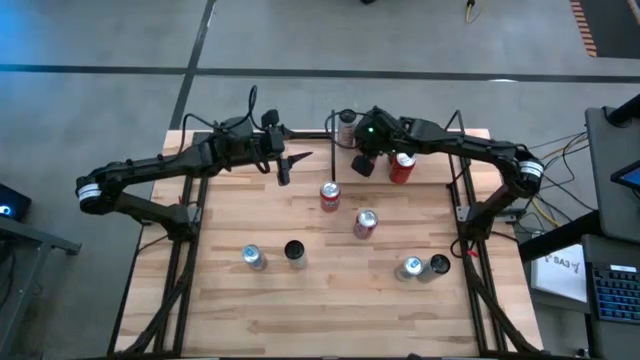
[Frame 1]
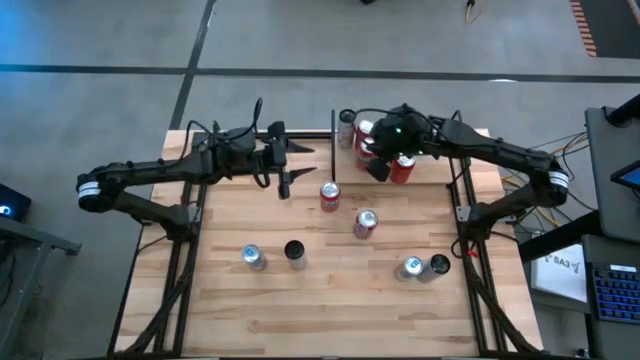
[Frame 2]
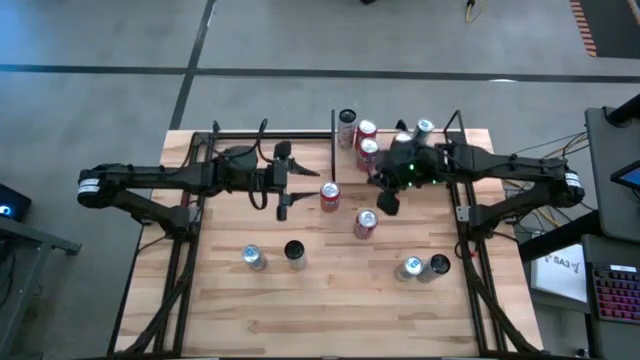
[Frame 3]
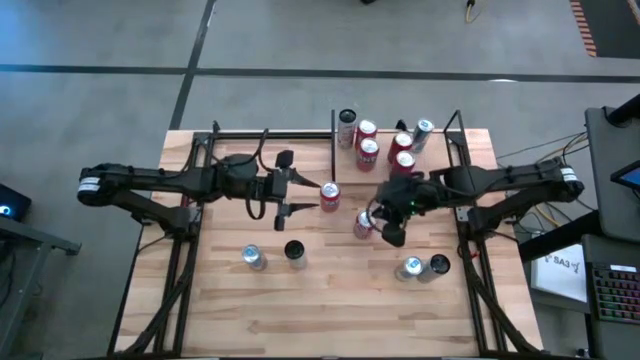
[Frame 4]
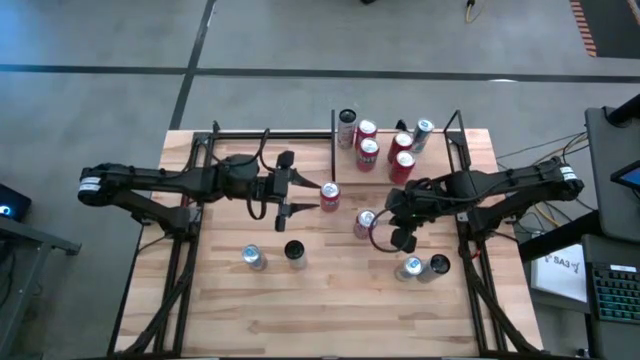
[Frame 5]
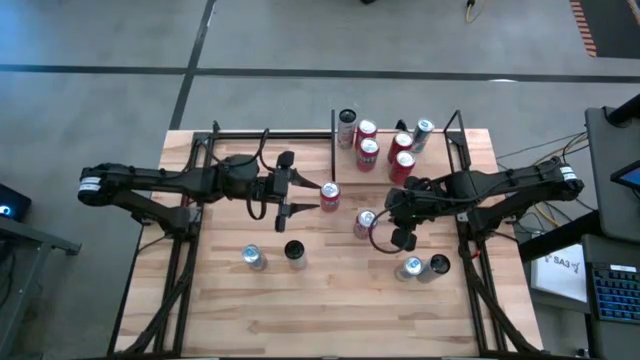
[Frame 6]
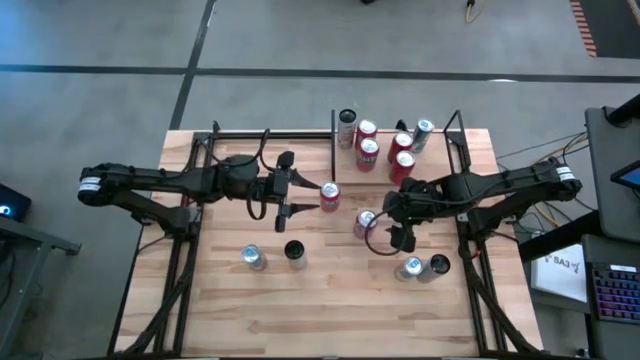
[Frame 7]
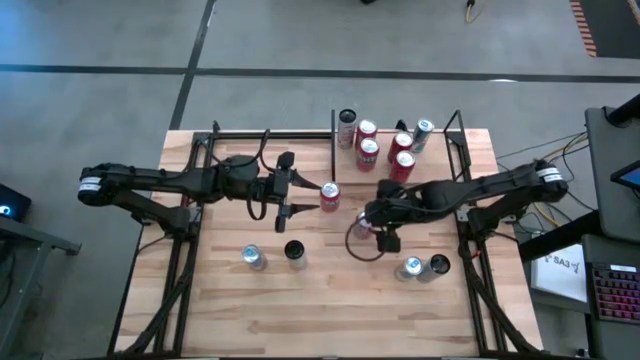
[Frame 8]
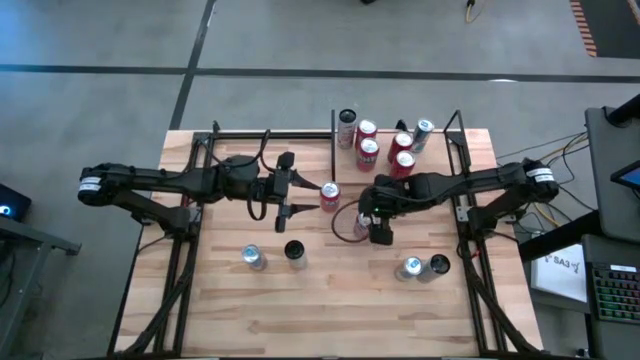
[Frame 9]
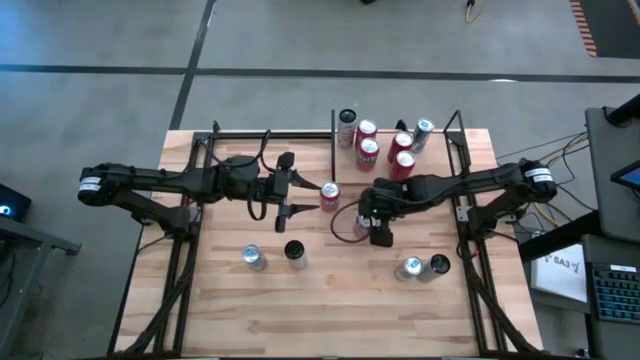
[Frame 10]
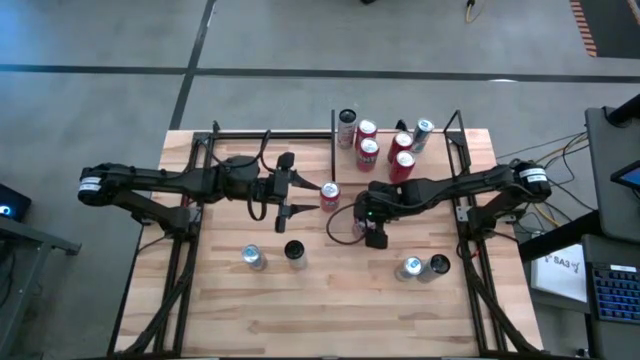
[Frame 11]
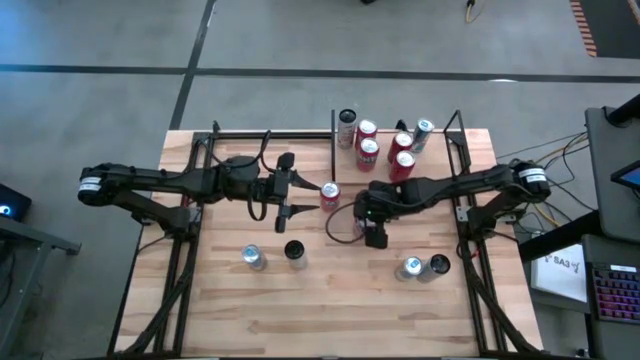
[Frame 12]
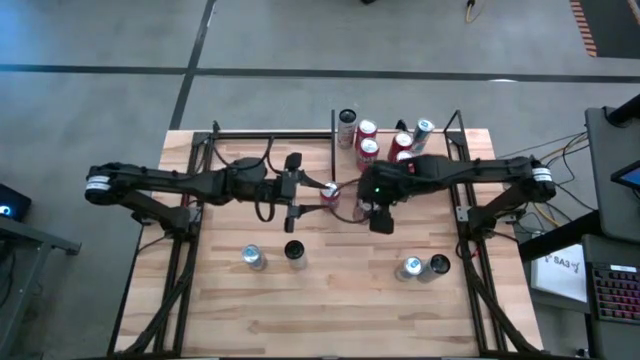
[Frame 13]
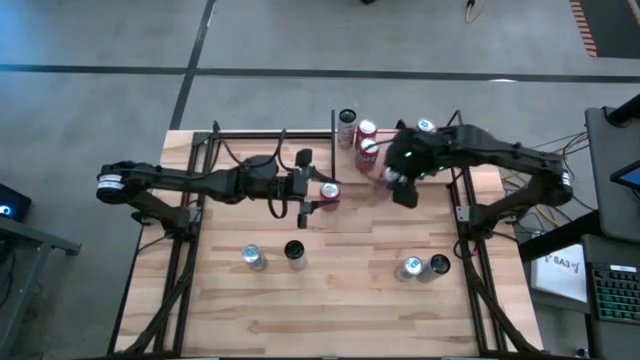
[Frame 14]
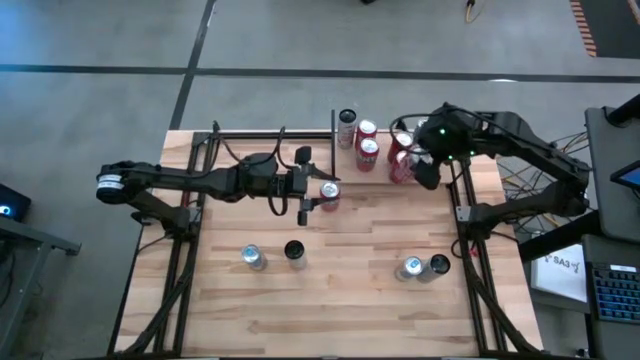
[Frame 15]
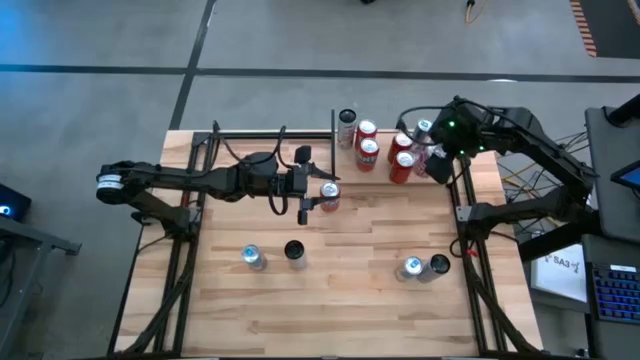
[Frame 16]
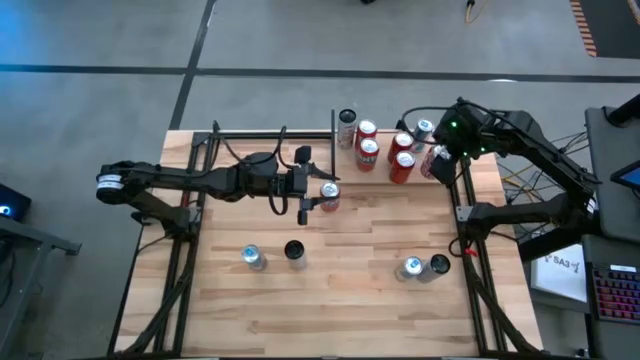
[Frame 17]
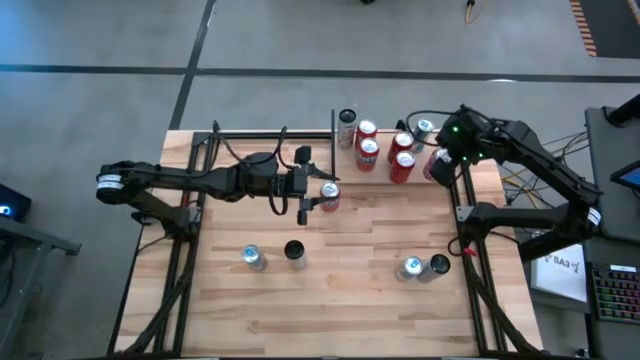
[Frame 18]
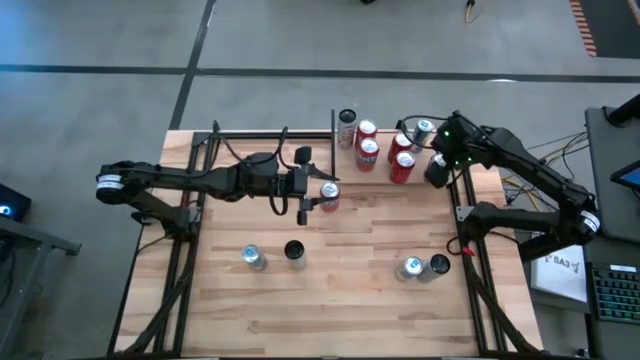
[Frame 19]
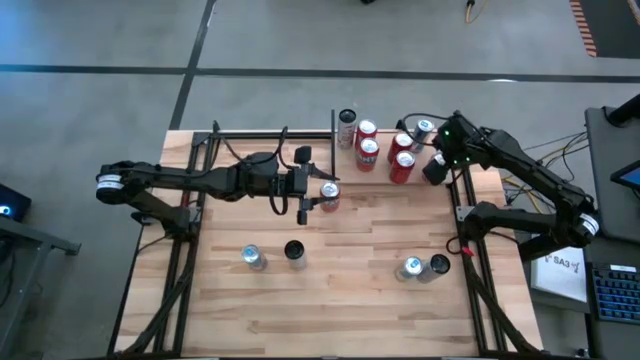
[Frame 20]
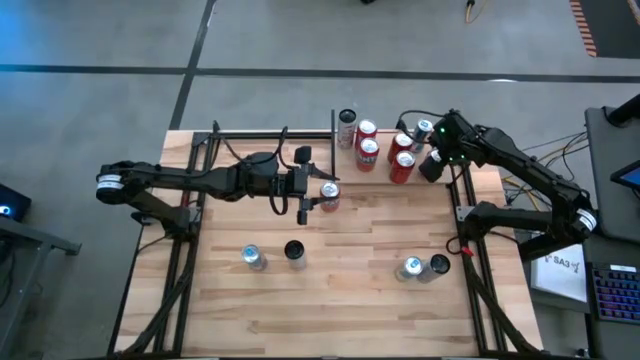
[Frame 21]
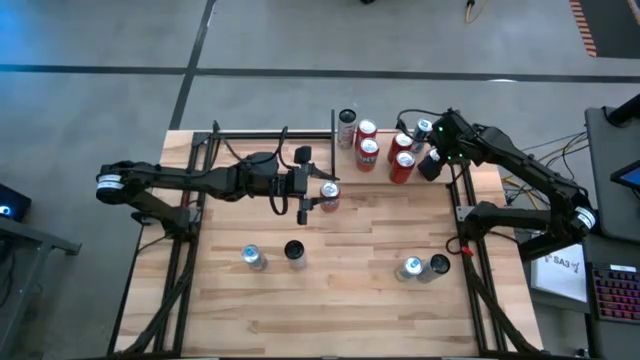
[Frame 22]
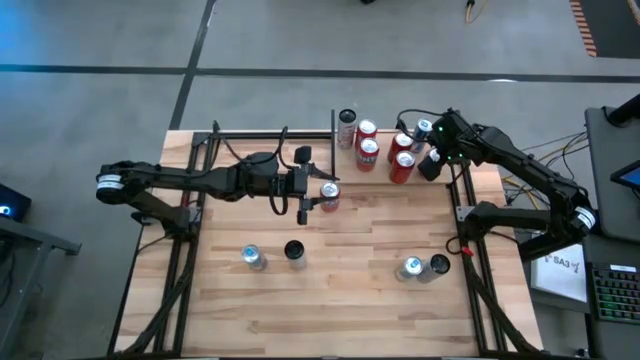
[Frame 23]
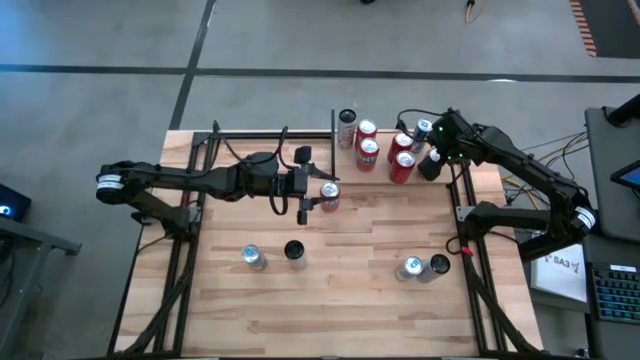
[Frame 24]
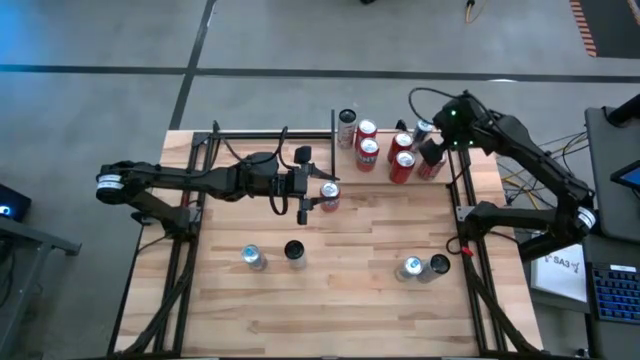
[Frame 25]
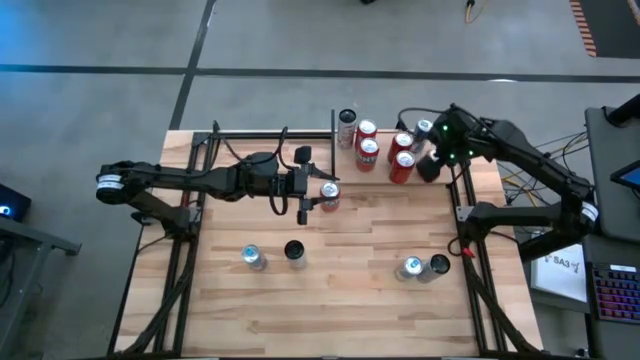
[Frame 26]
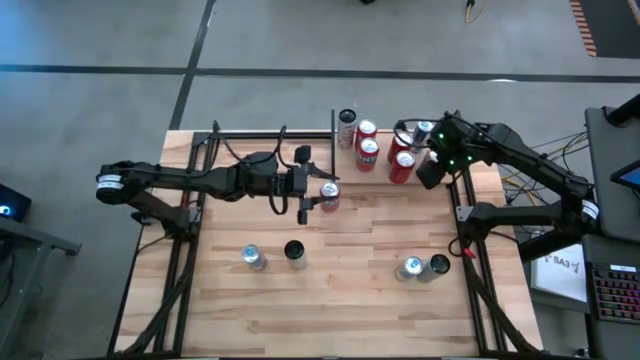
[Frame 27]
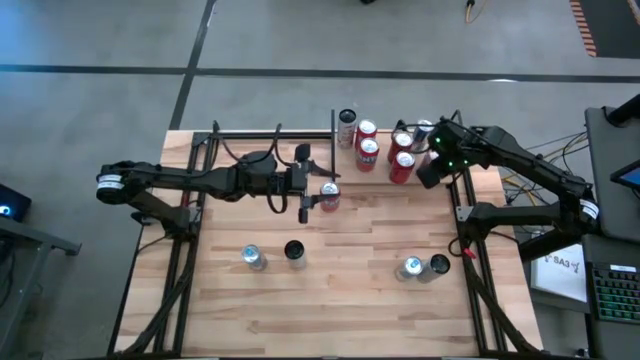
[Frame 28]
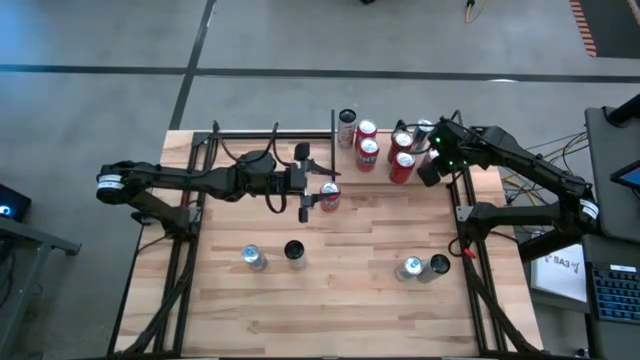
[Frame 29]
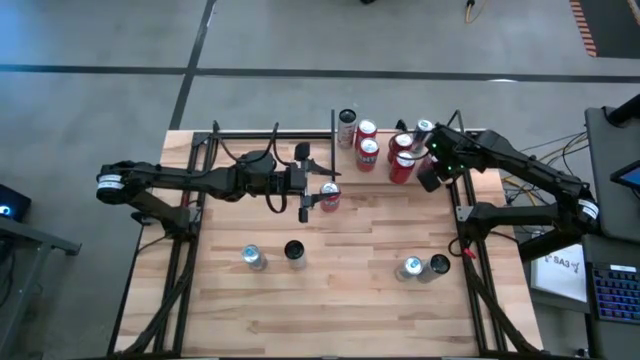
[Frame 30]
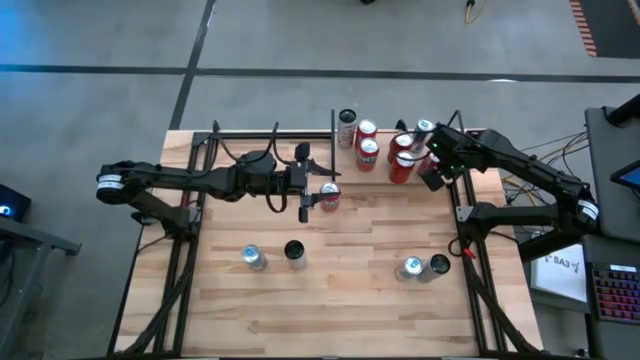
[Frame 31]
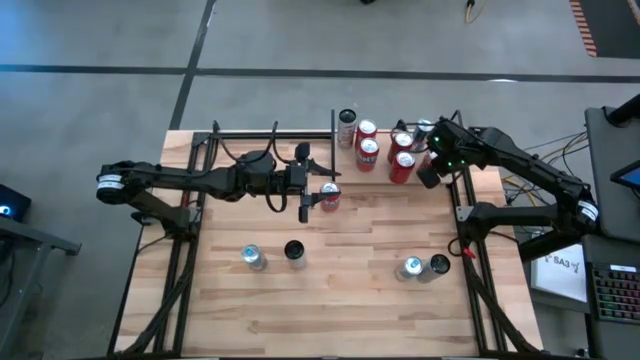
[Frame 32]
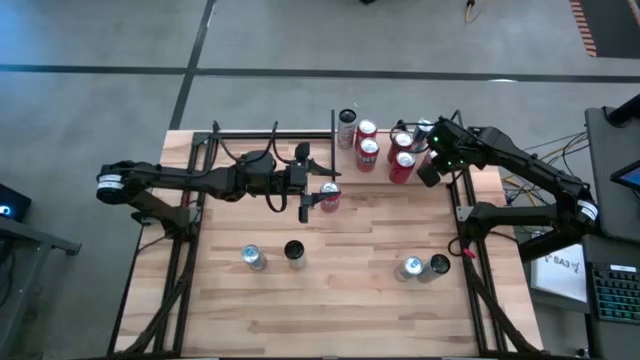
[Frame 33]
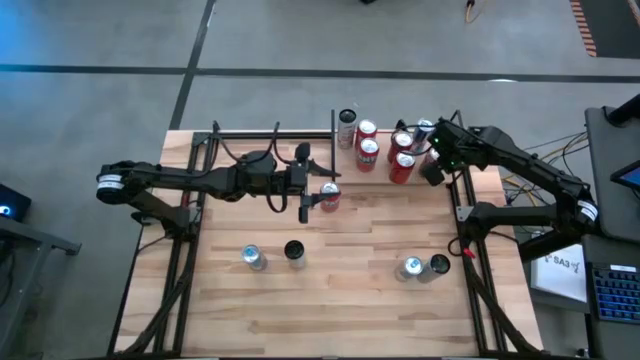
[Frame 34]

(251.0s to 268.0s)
Task: Place canned beverage on shelf
Put the red white soda can on the shelf

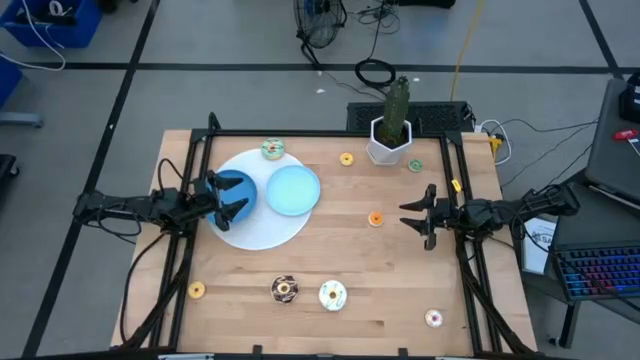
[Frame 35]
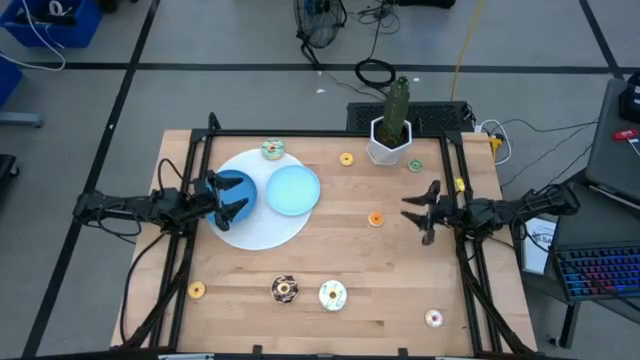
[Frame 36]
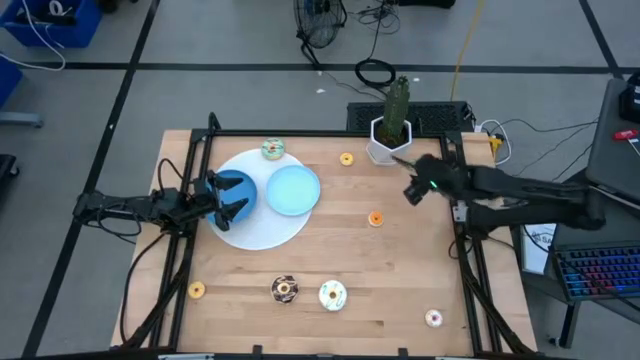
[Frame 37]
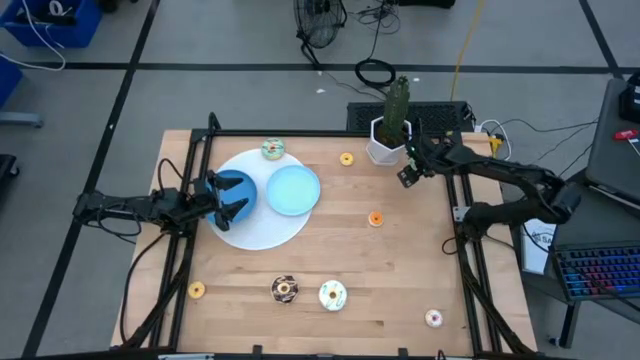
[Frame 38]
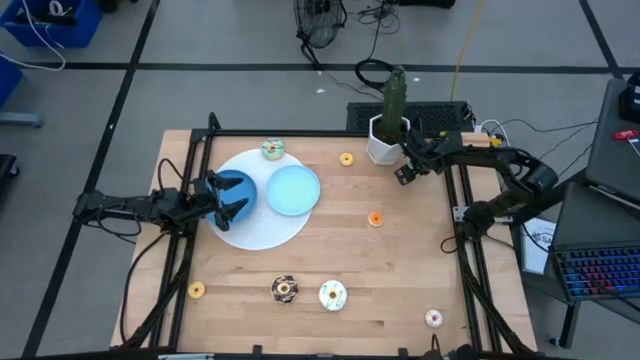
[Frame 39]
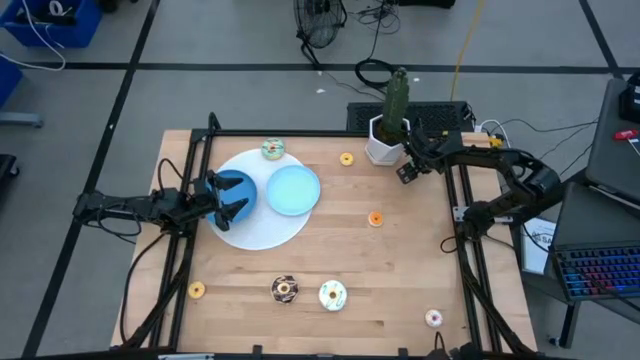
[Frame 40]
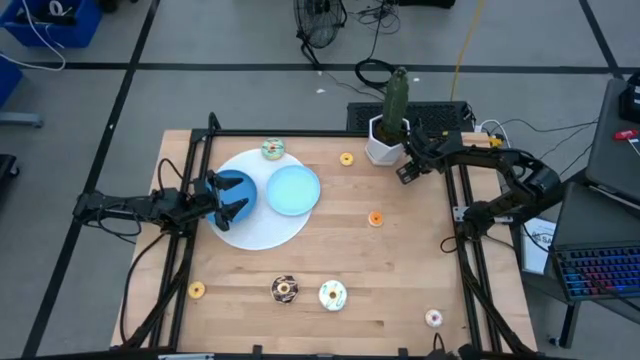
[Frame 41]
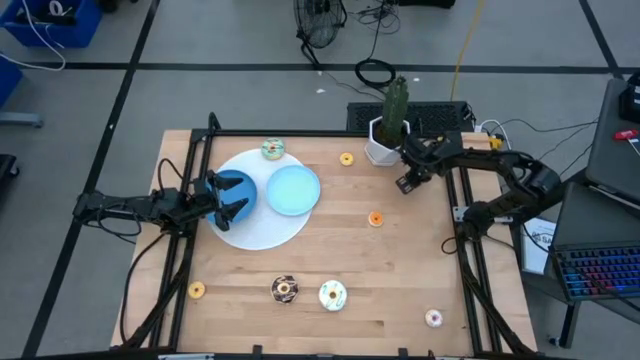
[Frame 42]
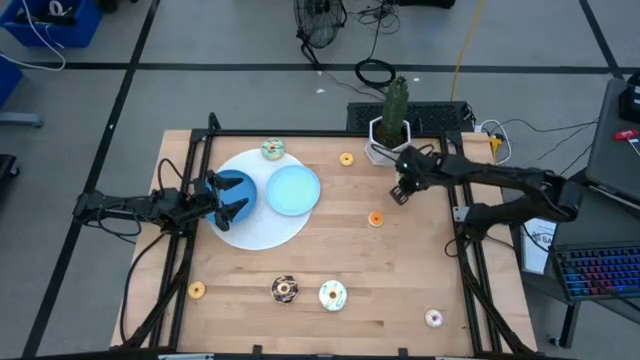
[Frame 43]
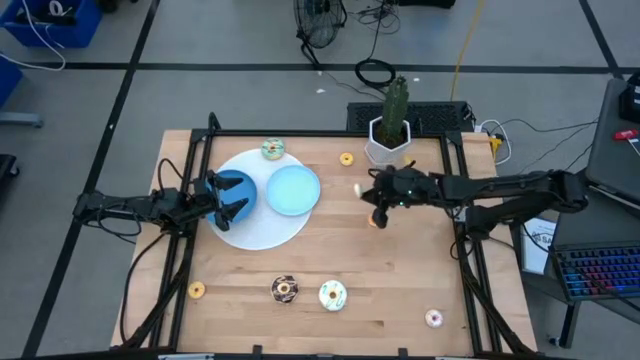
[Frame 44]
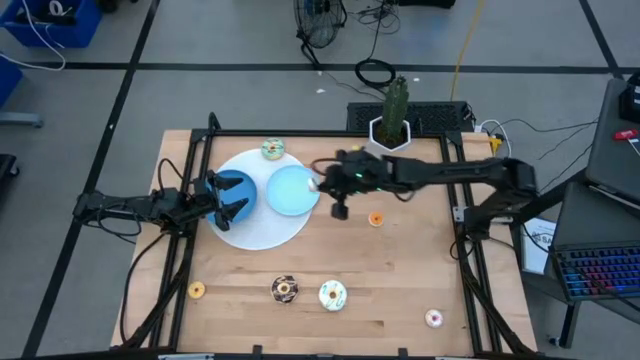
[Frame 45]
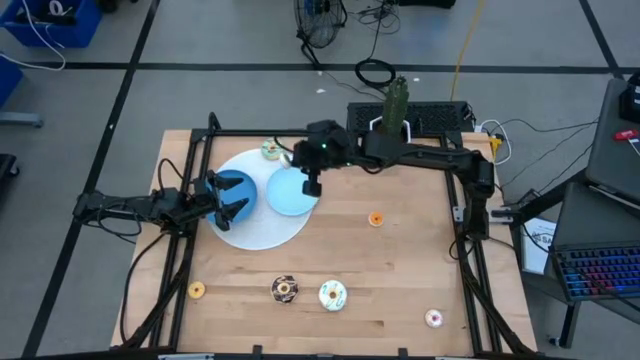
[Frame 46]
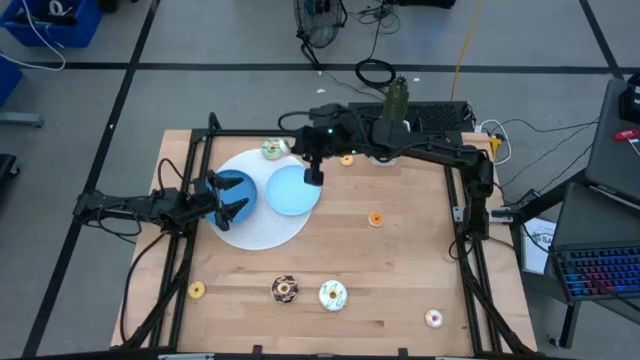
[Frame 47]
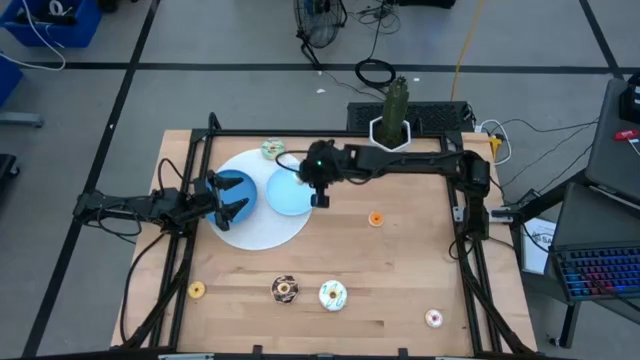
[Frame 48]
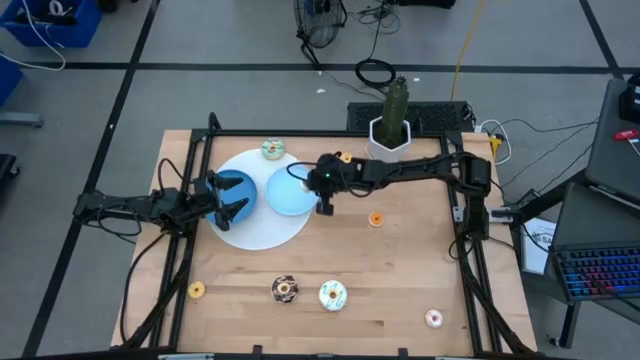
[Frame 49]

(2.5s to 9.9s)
Task: Pick & Place donuts
Put the small green donut on the blue plate
